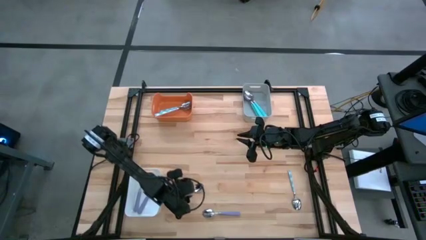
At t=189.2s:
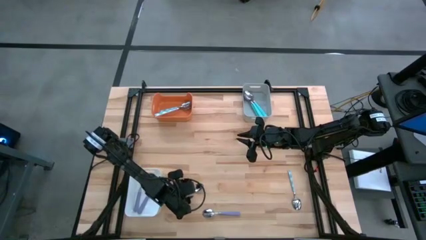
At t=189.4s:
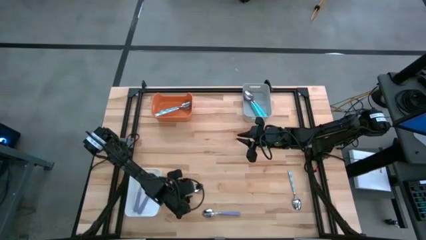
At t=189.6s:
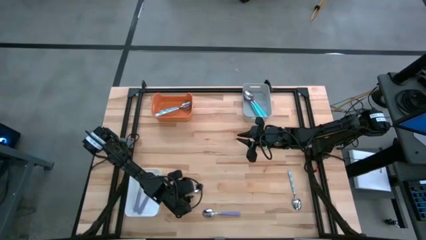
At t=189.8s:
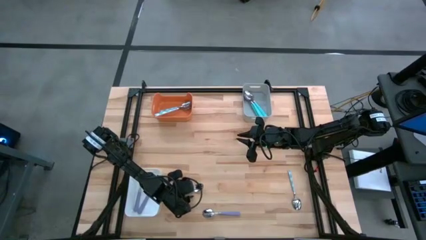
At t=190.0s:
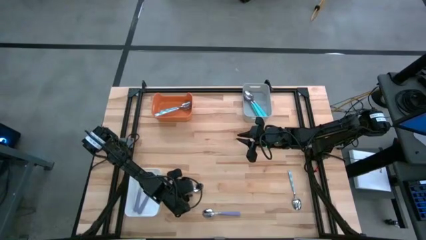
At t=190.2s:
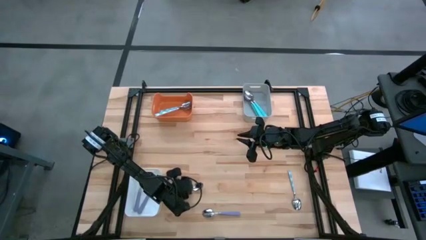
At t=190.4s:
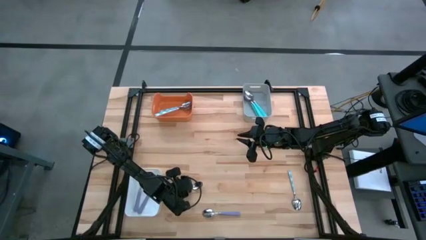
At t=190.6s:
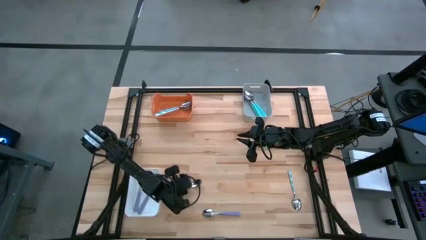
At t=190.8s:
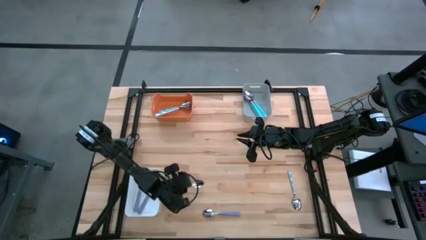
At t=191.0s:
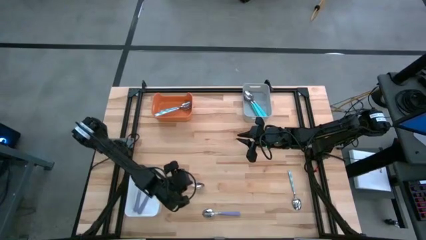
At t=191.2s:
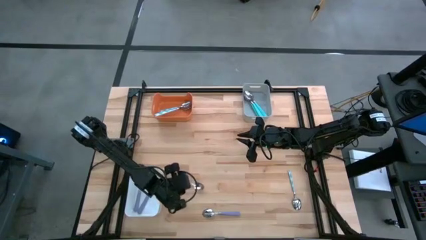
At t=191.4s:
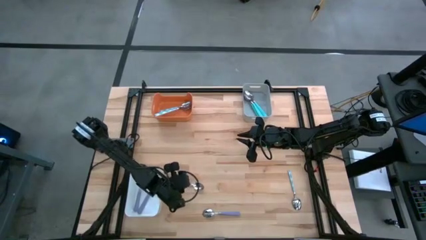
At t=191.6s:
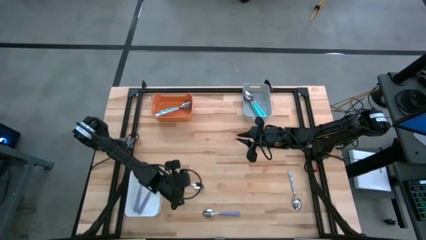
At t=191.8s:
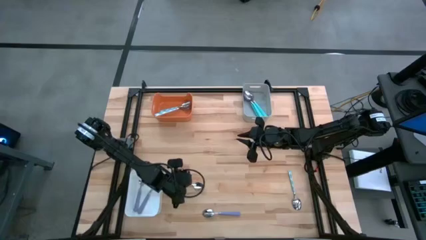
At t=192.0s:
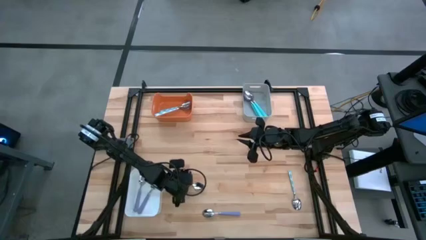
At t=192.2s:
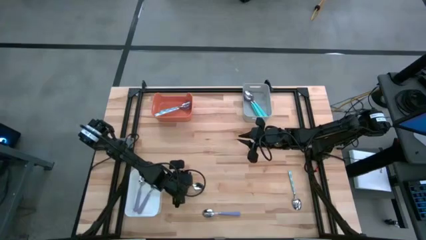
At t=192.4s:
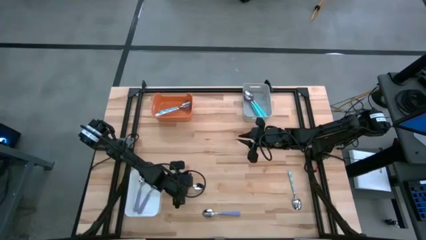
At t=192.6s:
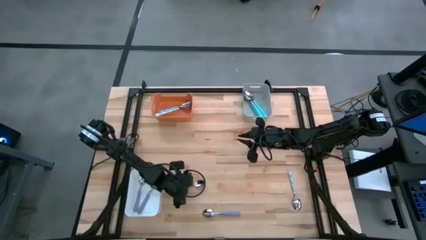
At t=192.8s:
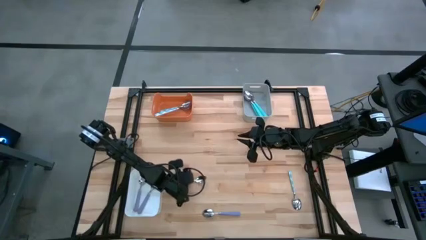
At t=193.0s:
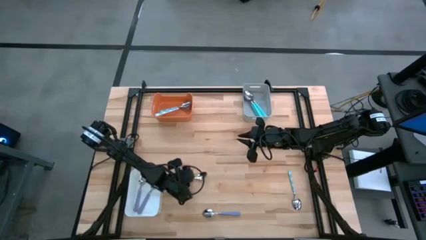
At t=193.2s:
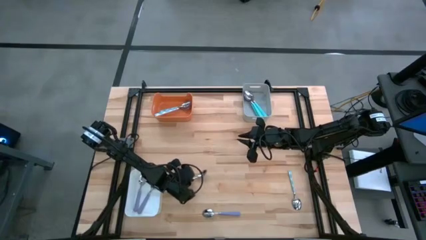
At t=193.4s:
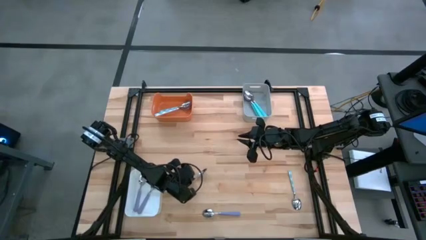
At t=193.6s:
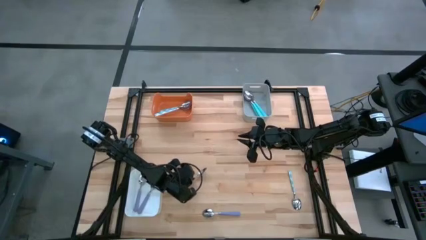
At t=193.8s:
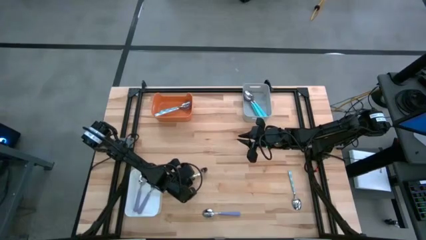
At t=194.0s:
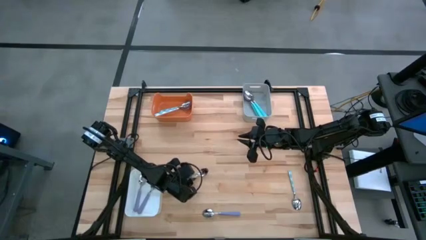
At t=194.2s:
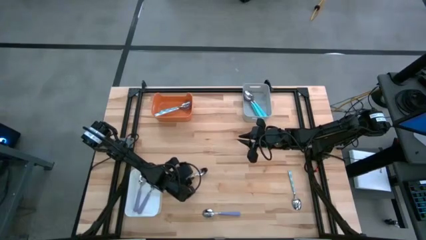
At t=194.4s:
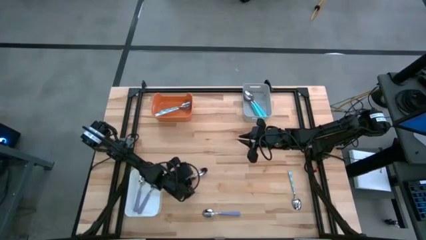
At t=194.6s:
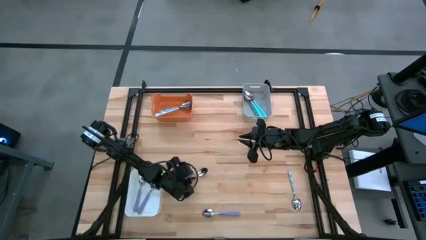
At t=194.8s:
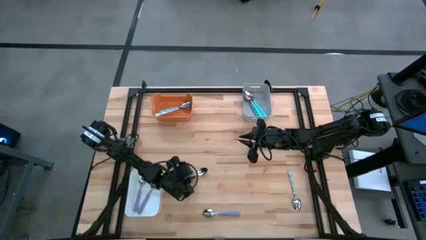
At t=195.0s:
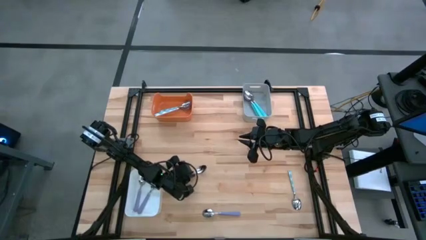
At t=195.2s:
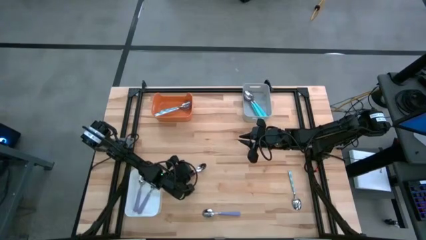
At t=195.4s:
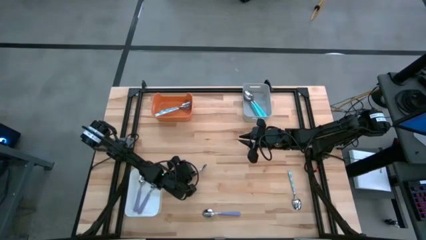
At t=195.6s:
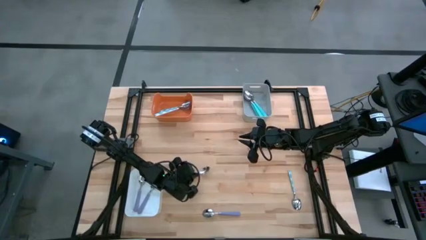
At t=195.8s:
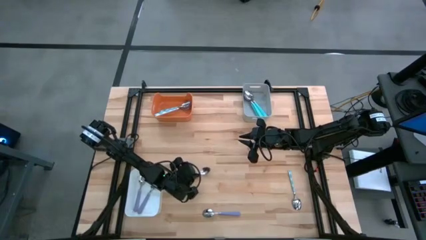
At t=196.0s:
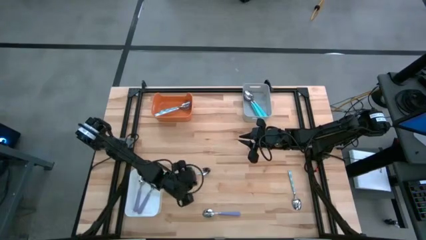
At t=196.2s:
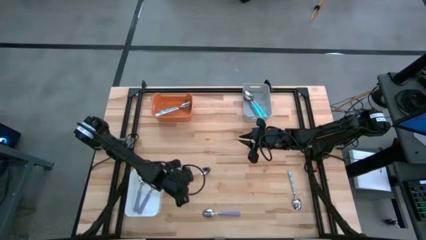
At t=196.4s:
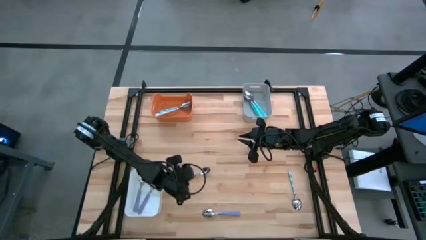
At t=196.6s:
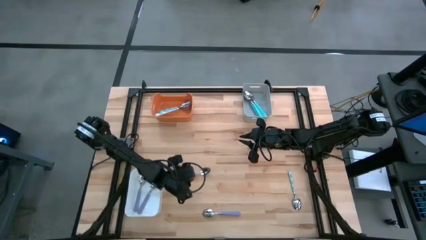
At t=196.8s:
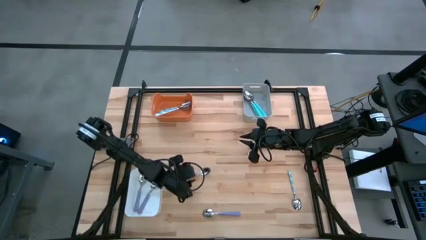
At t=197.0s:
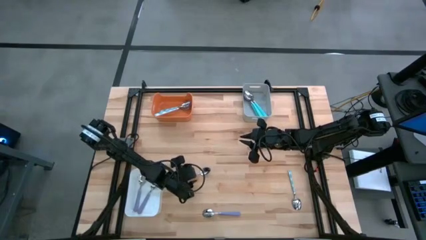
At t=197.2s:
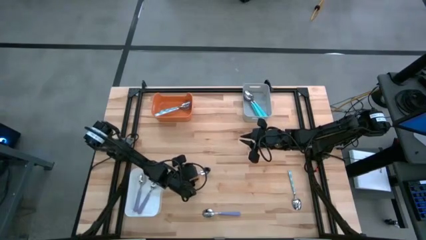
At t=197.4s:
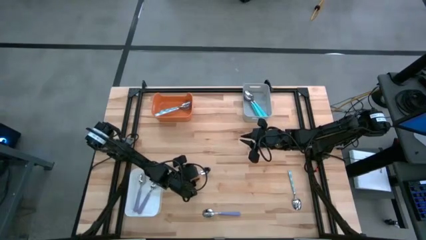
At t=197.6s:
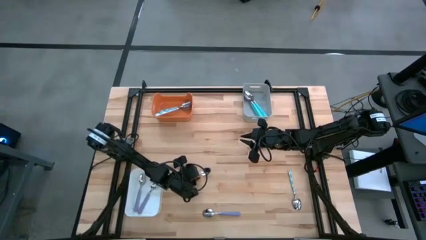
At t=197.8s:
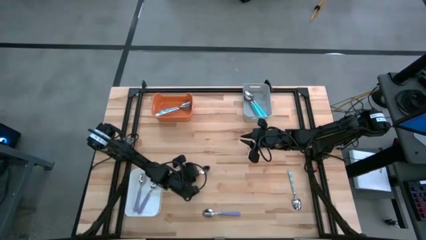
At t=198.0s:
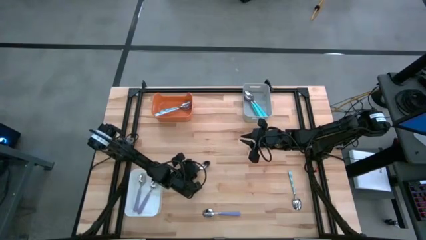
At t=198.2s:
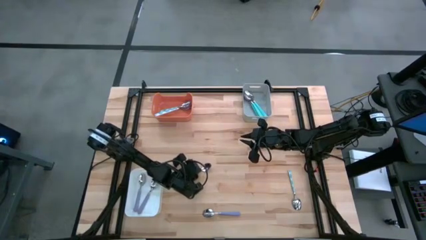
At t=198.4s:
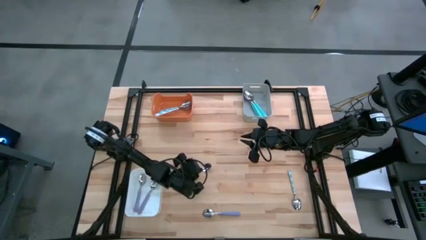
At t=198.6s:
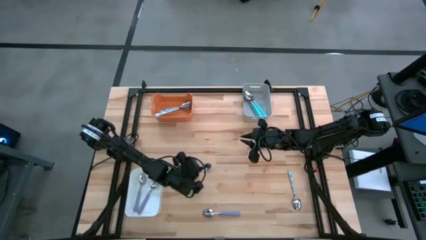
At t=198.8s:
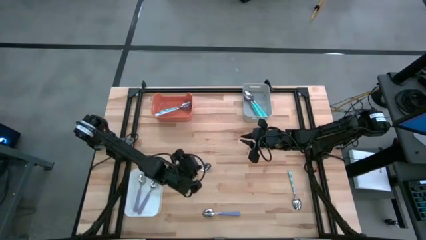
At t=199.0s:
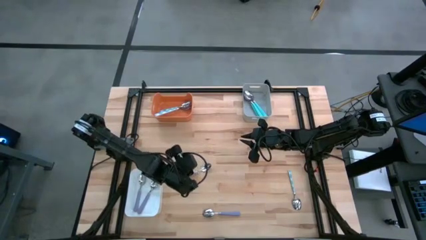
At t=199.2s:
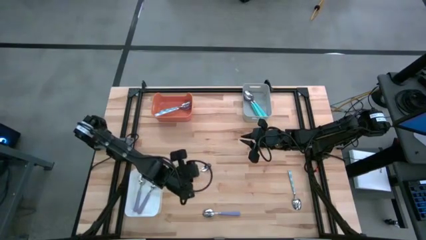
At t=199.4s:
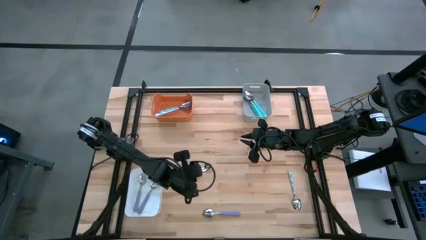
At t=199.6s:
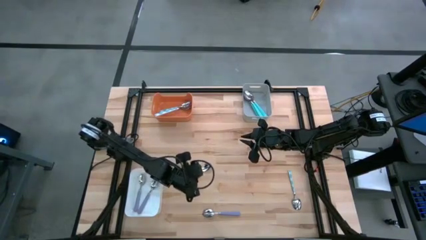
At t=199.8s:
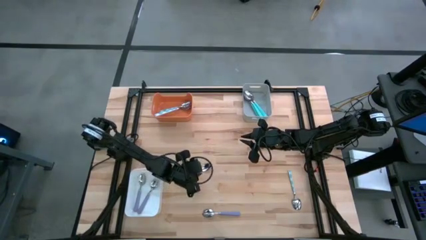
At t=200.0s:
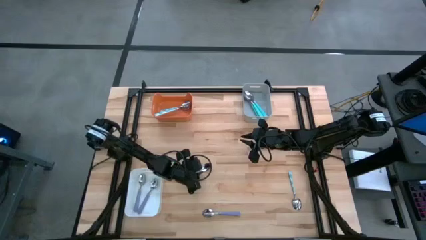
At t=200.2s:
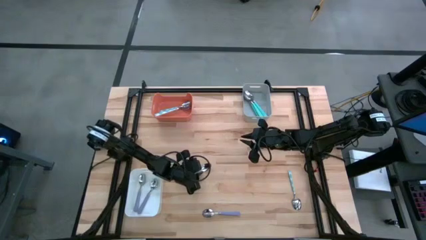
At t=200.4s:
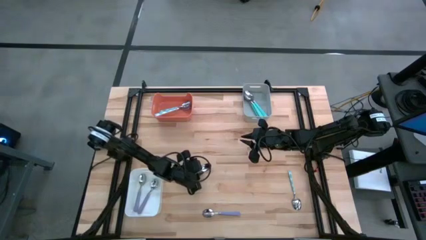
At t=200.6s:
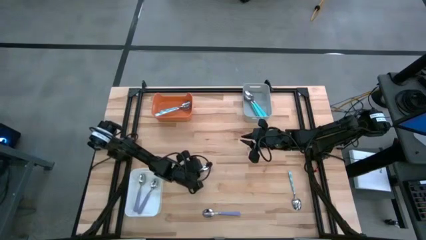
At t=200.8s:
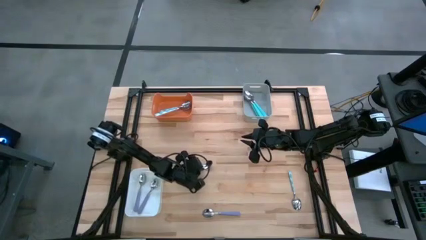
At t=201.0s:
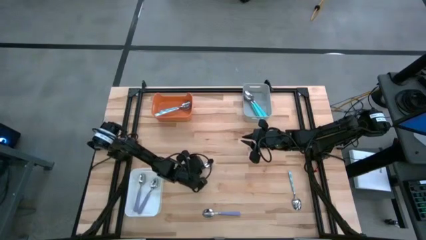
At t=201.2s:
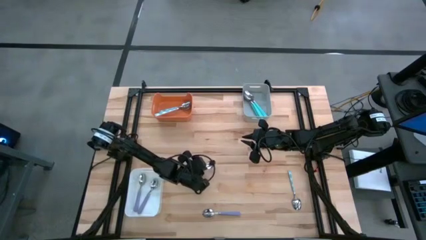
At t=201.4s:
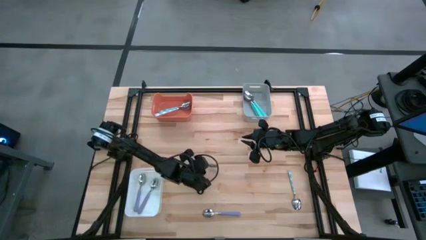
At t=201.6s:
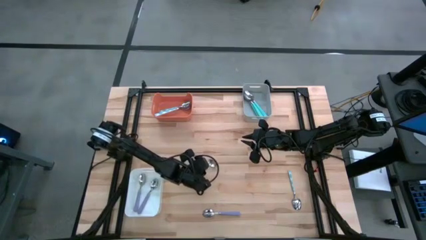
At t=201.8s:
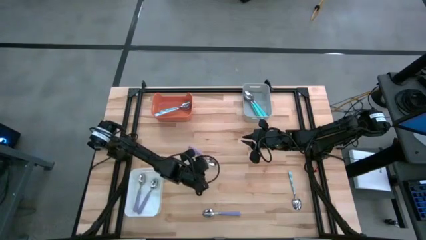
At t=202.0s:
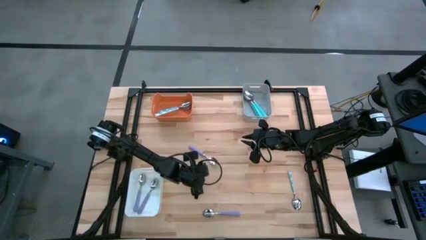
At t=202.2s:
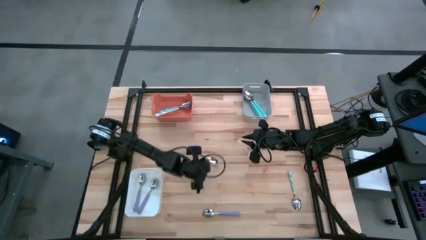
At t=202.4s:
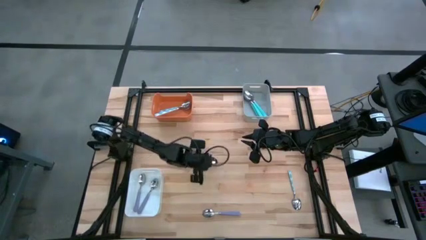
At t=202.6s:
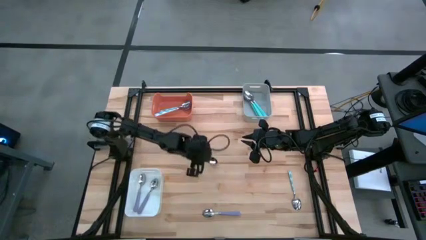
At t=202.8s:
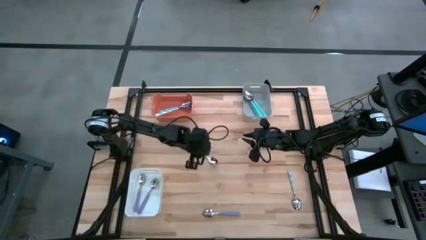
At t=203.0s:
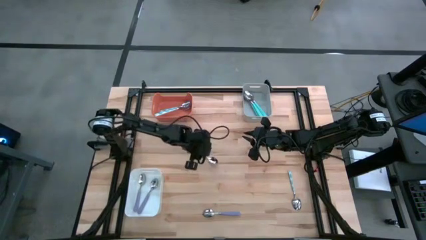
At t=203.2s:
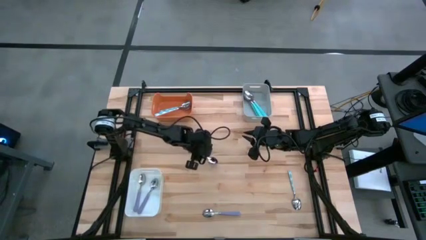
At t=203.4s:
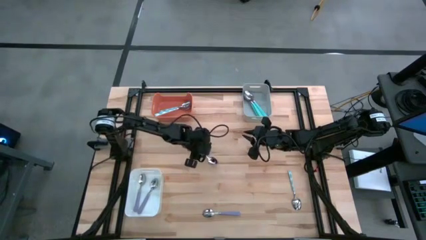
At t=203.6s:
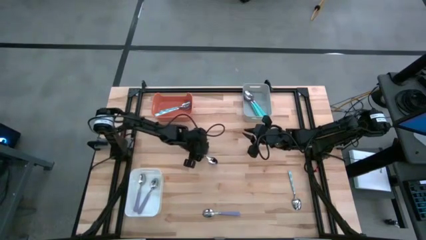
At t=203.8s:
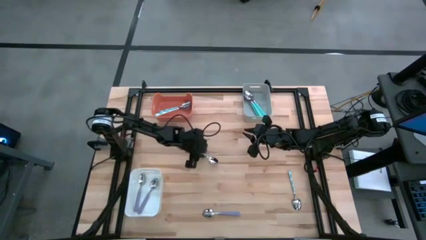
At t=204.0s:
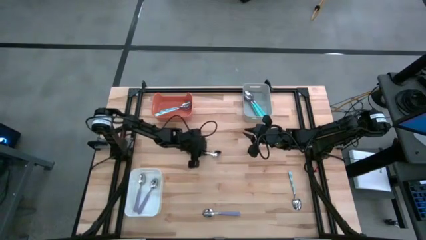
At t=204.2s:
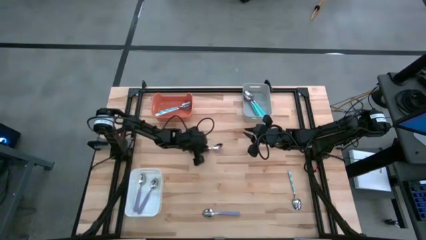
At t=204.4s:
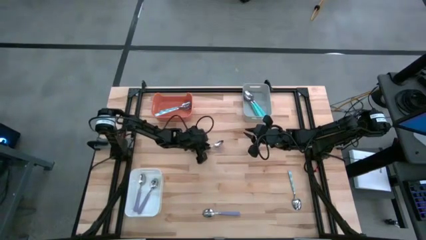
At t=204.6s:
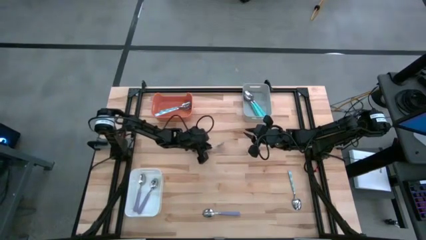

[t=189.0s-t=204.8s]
Task: Sort silverware by color (type)
Put the left purple spoon into the white bin
